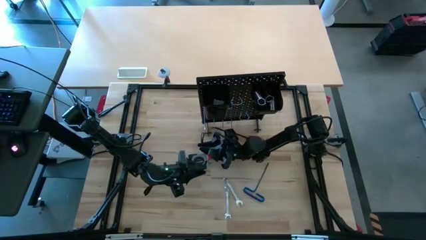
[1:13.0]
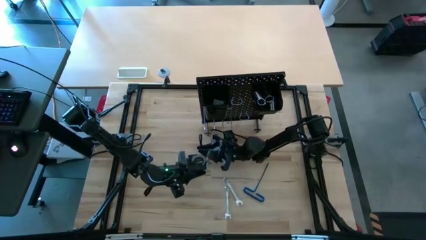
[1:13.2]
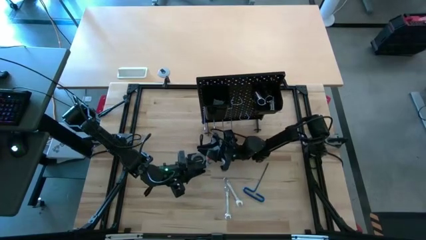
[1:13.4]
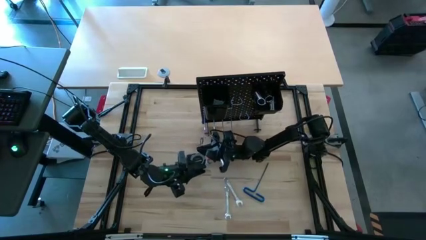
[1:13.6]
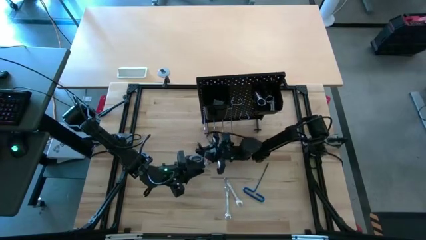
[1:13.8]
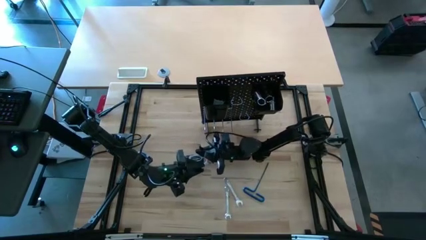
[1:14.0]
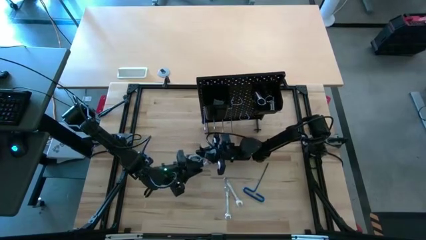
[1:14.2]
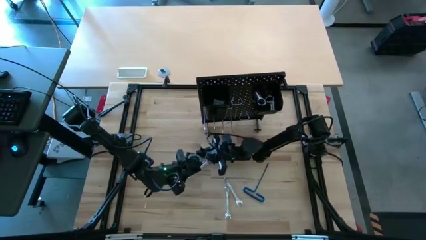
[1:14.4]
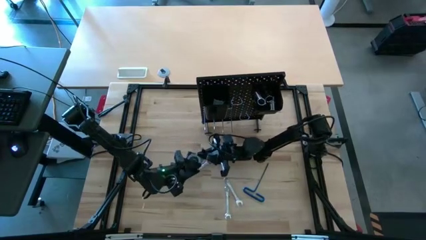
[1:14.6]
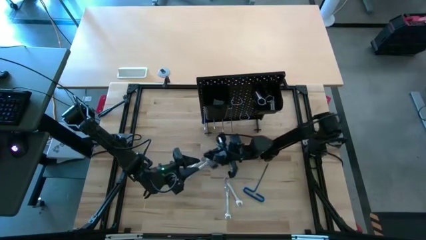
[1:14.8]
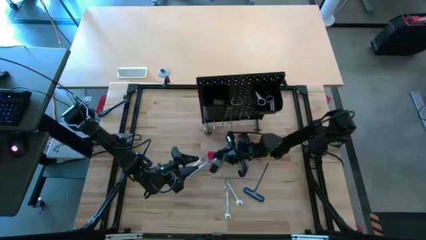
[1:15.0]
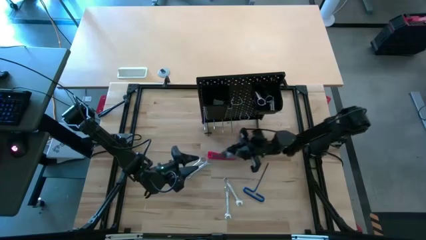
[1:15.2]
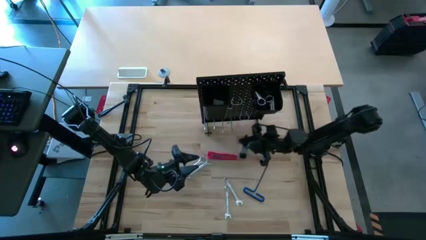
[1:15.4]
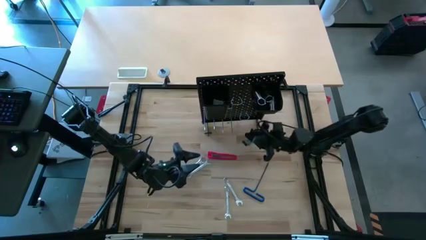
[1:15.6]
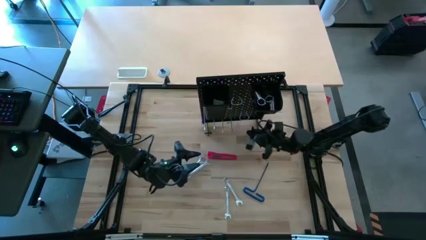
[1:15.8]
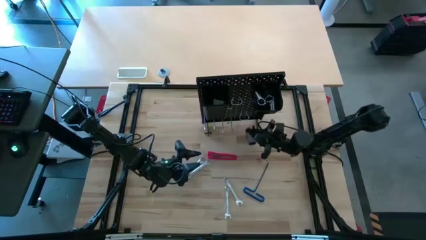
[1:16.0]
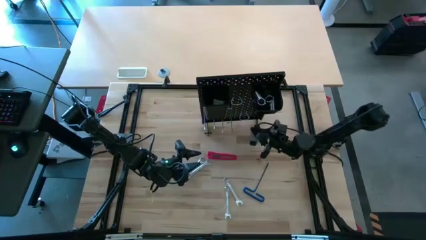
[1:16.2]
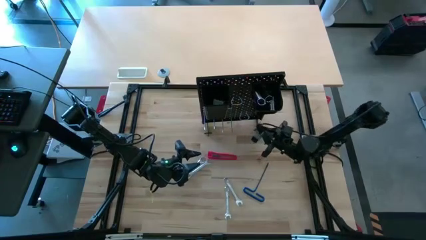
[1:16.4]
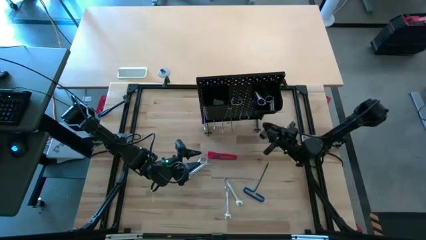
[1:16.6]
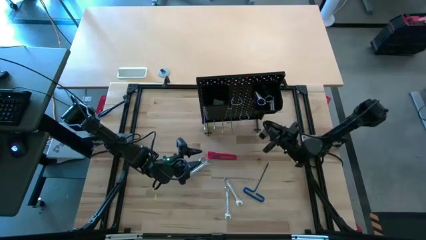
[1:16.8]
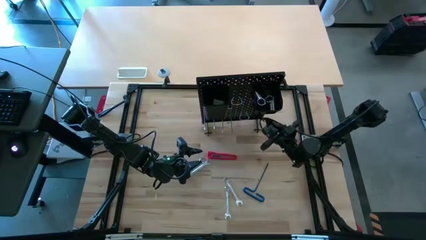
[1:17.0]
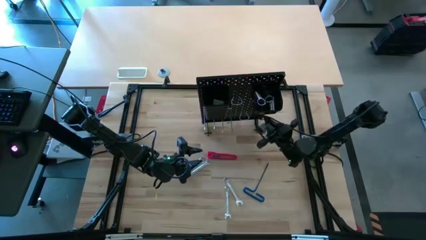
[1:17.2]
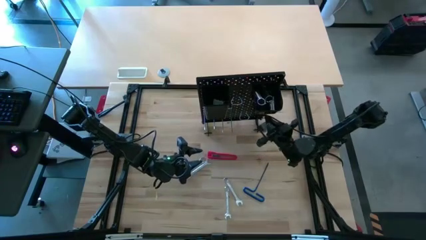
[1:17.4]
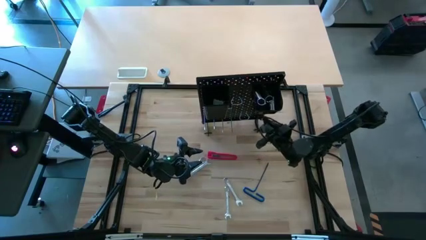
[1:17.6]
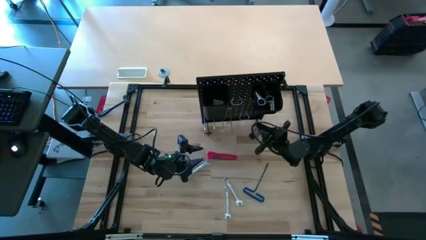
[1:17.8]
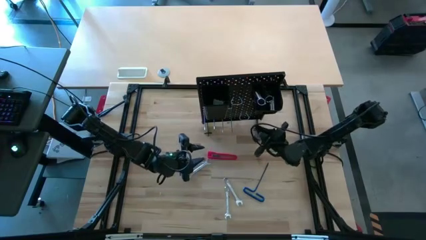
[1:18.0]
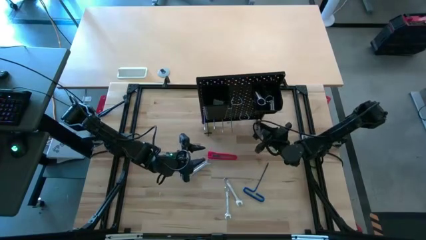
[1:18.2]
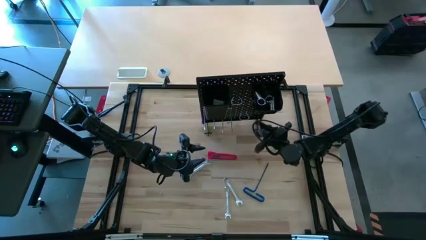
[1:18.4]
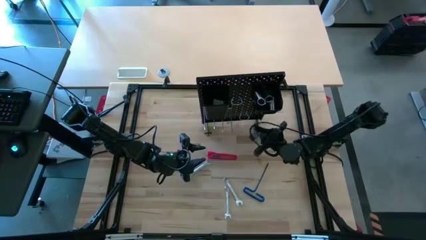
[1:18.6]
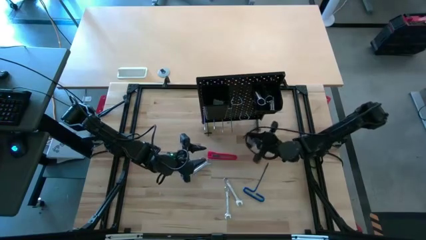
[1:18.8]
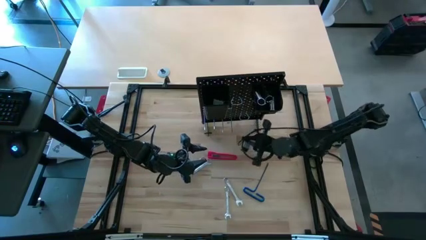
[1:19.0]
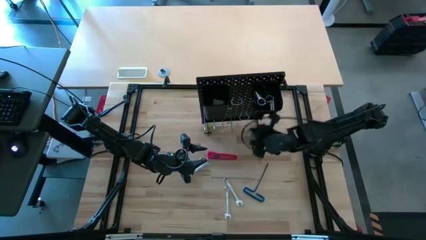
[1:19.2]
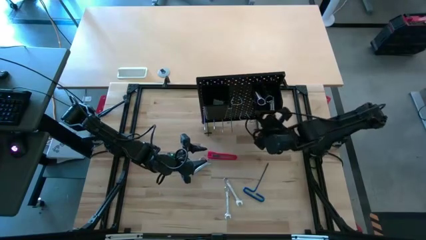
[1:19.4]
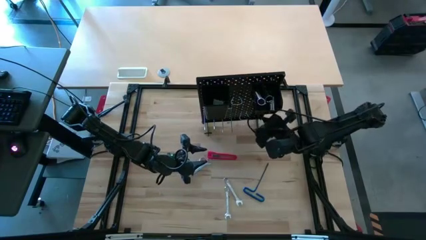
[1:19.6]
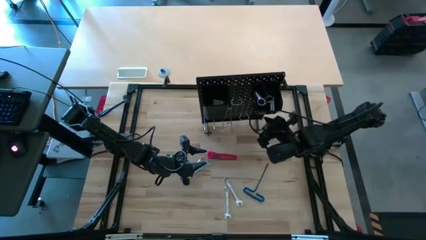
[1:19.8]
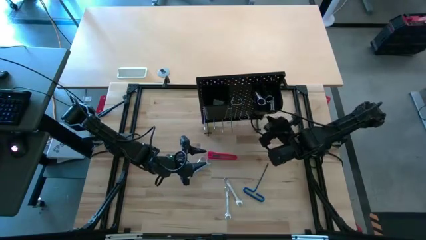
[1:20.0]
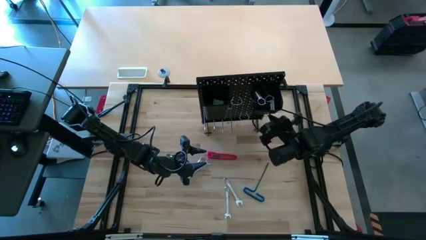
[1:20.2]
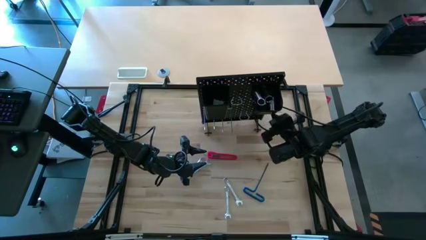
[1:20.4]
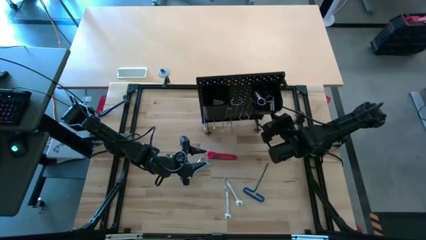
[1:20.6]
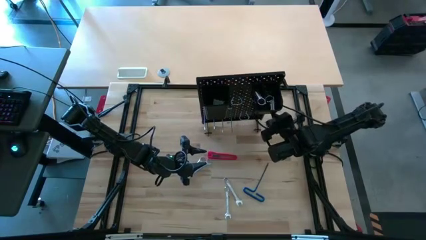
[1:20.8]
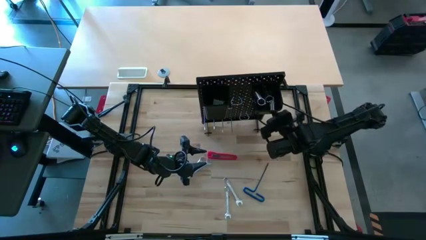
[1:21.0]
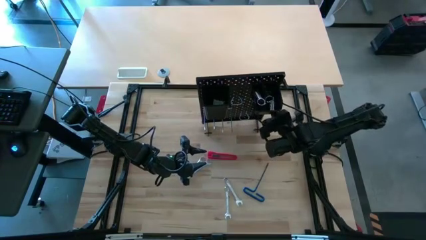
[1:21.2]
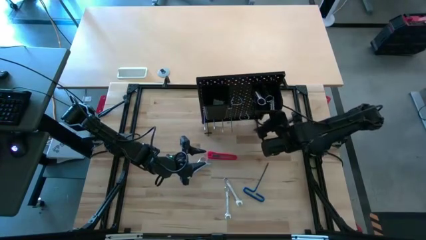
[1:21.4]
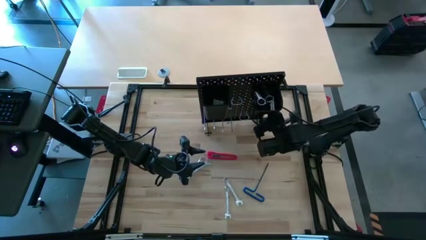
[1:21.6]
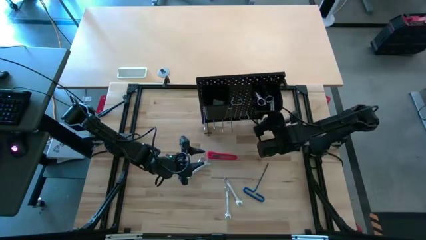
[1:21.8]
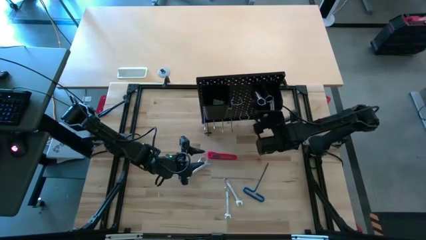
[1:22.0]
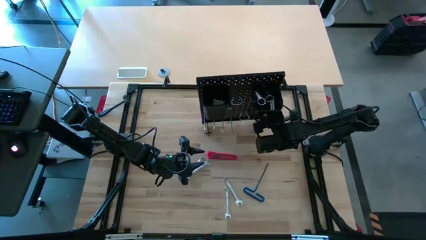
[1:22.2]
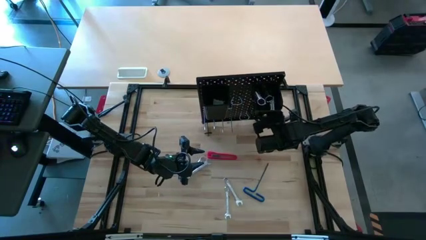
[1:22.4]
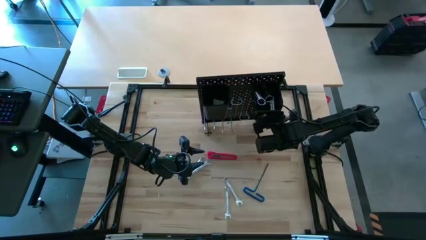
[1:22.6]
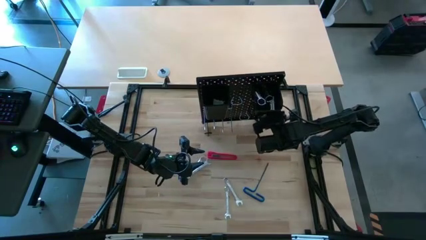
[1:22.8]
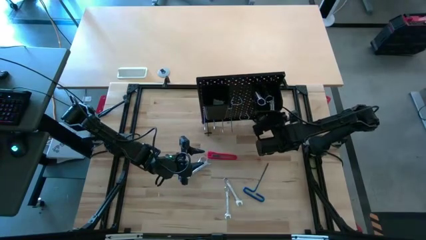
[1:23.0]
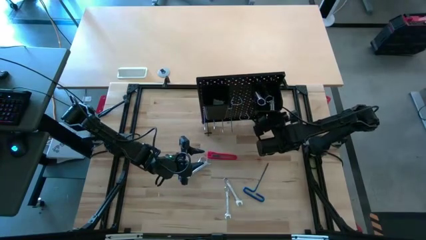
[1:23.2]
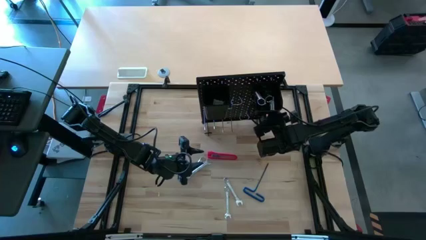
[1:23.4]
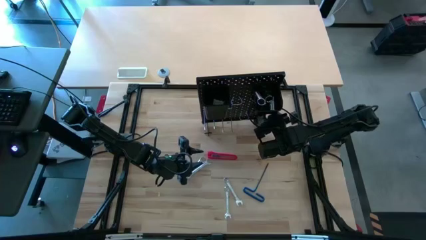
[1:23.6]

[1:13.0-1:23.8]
Task: Hang tools onto peg board
Hang the measuring tape on the peg board

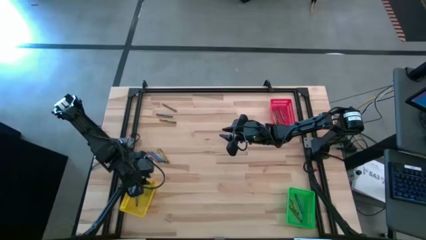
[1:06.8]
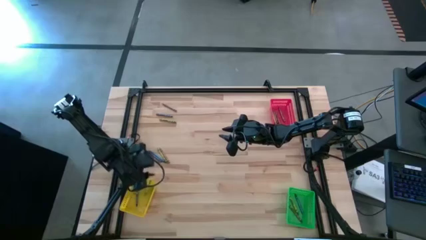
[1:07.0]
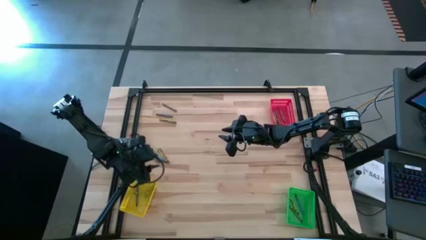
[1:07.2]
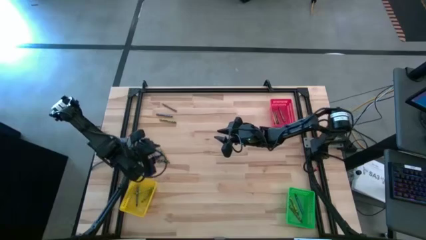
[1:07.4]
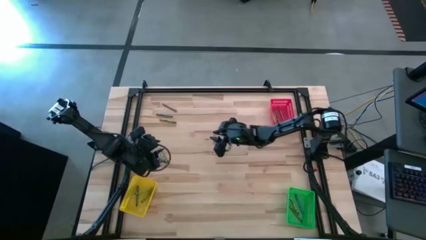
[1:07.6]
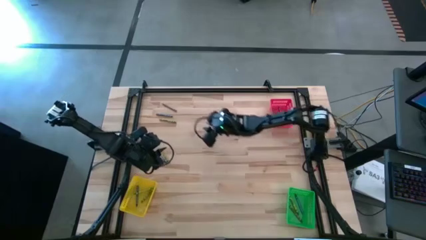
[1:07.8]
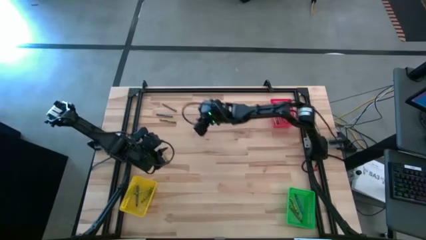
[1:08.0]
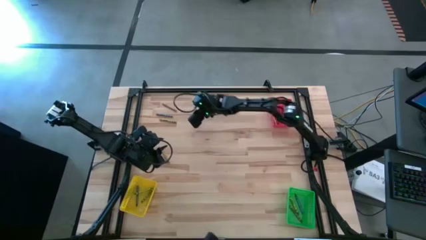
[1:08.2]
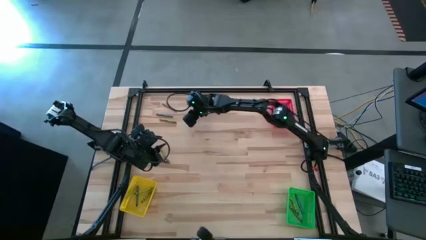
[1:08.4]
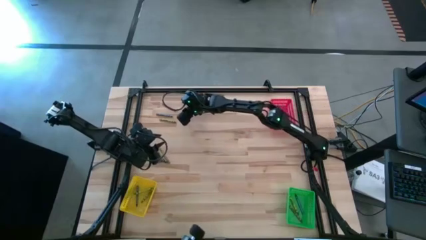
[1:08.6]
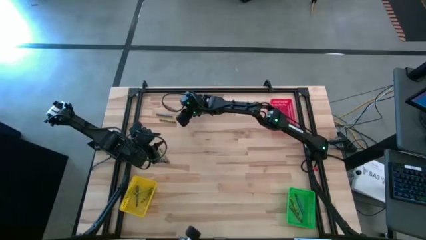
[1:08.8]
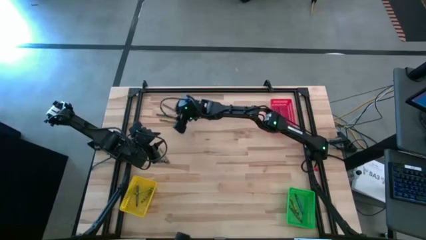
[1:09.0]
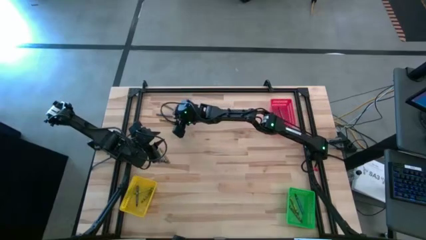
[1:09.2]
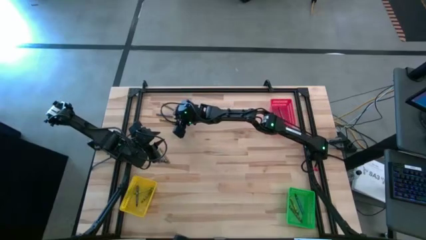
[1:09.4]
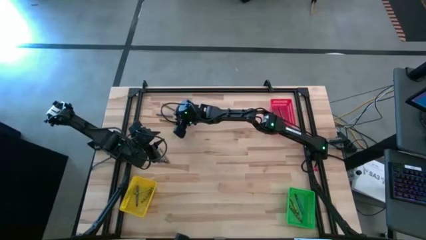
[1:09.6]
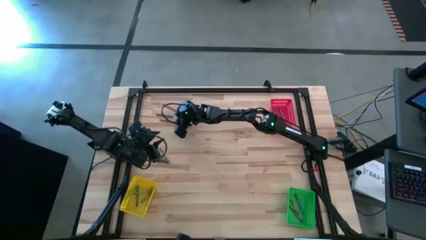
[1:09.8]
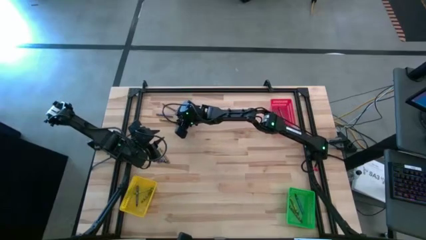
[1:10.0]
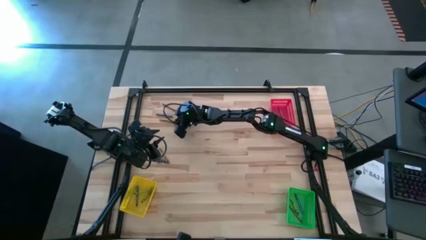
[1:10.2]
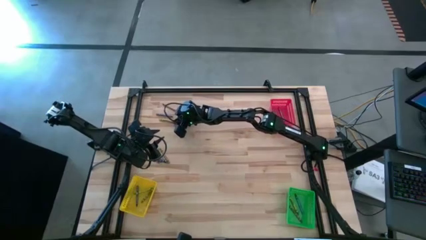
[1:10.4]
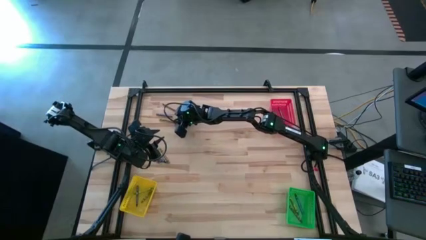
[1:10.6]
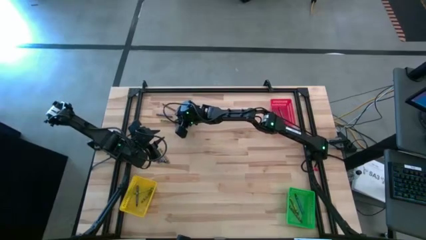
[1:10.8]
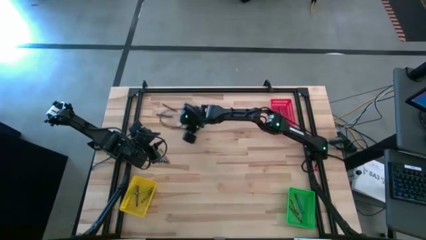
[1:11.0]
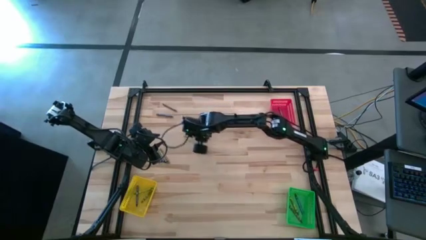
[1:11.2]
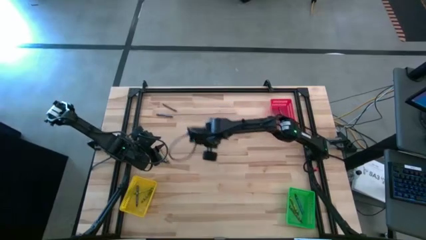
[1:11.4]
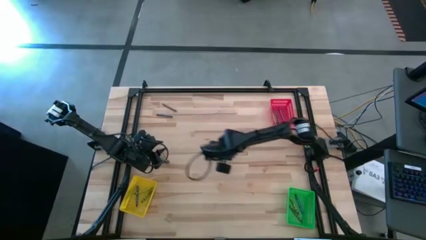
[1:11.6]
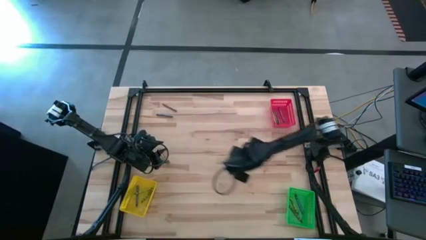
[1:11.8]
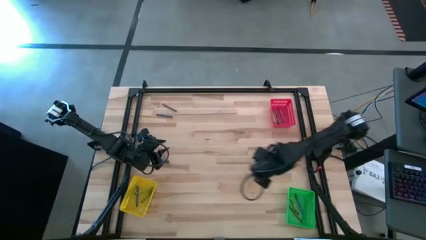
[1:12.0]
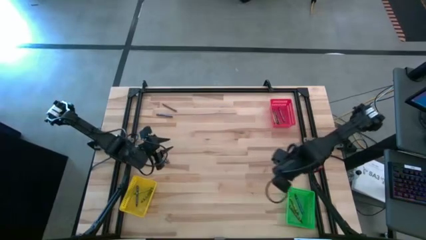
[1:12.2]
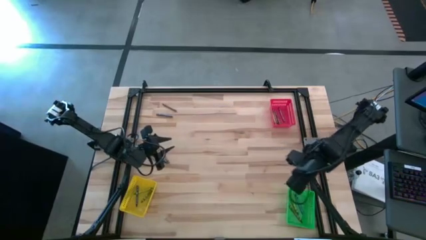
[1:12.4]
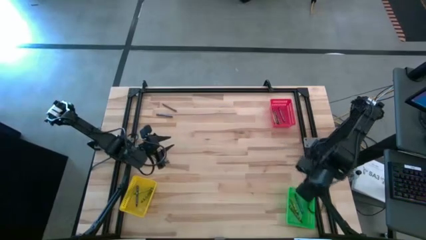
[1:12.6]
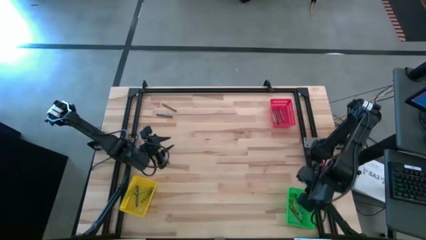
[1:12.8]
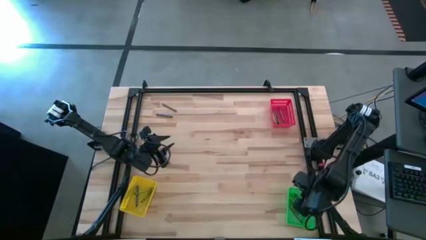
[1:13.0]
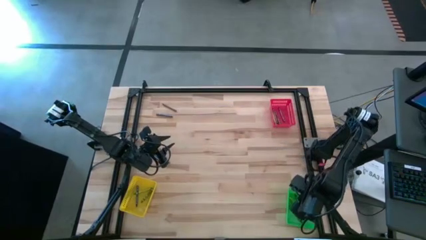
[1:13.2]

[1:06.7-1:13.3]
Task: Sort crayons
Put the green crayon into the green bin
